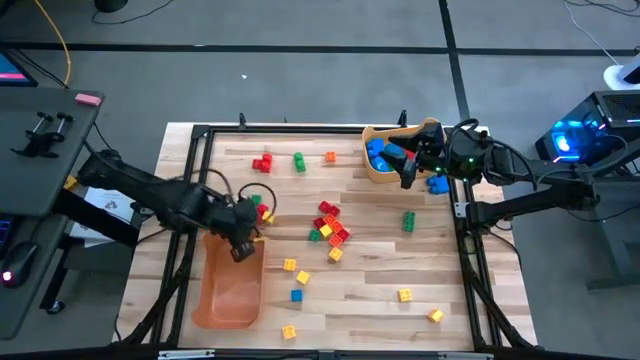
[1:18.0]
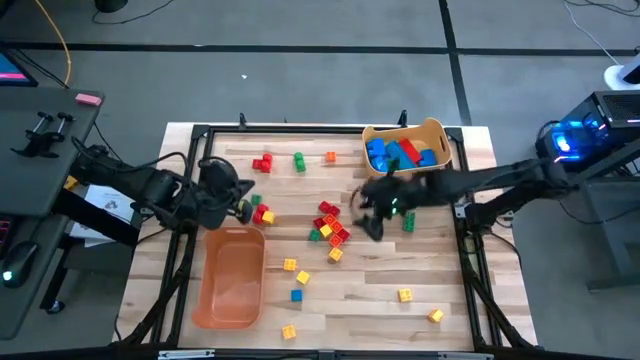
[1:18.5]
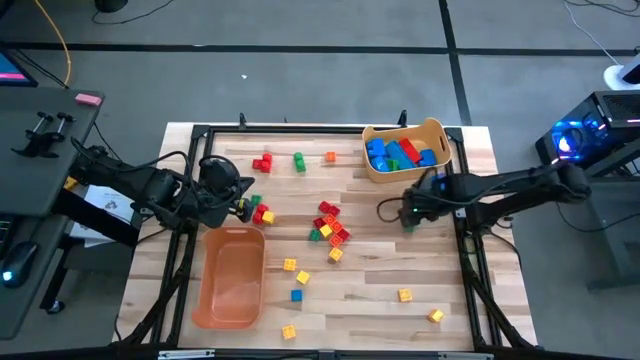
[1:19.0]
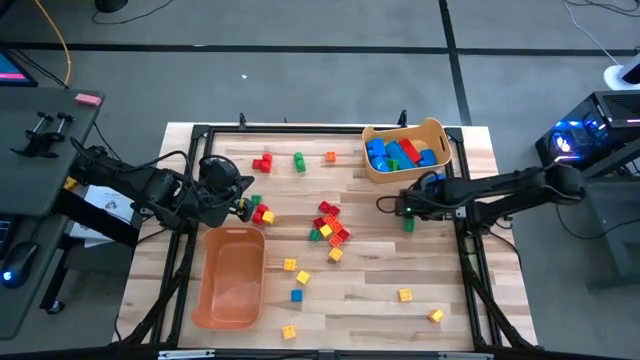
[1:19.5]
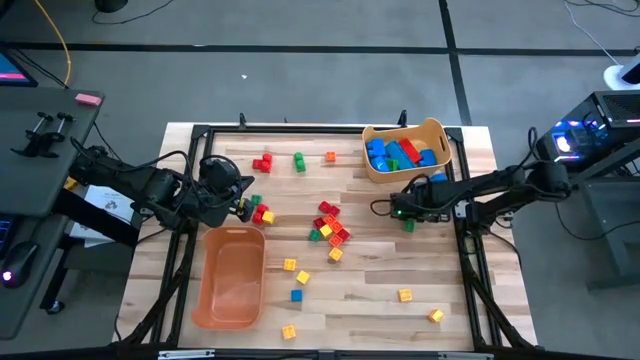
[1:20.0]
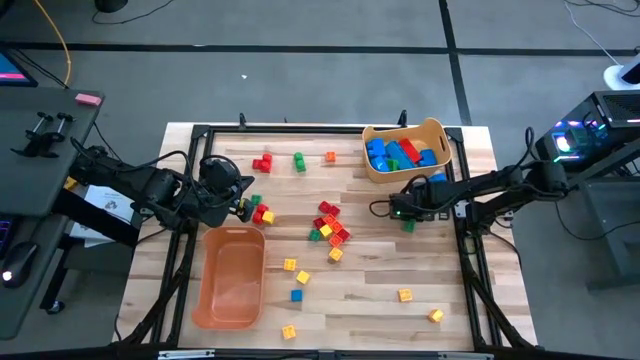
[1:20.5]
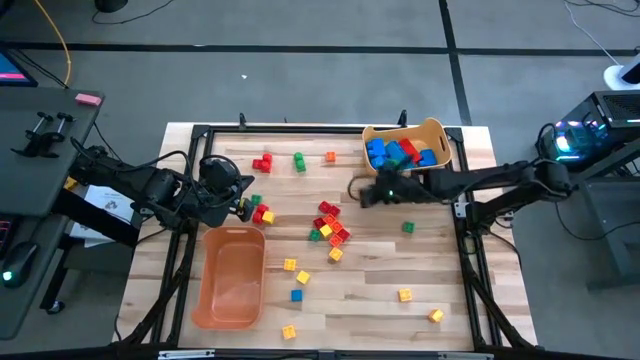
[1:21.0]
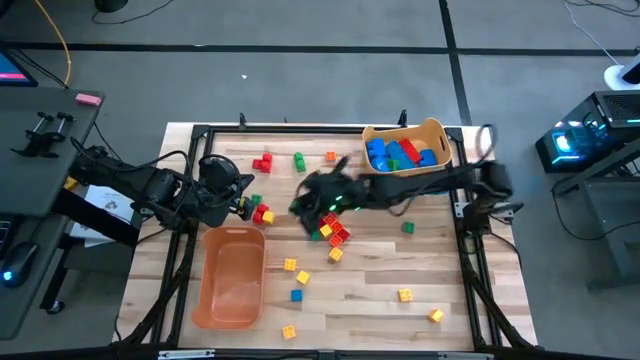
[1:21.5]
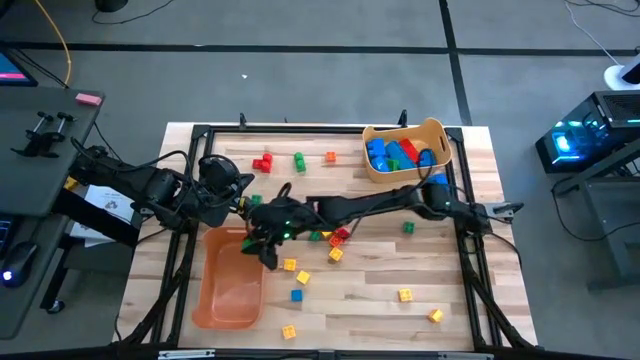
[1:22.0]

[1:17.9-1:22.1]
Task: Sort blocks by size
Put the green game piece into the orange bin

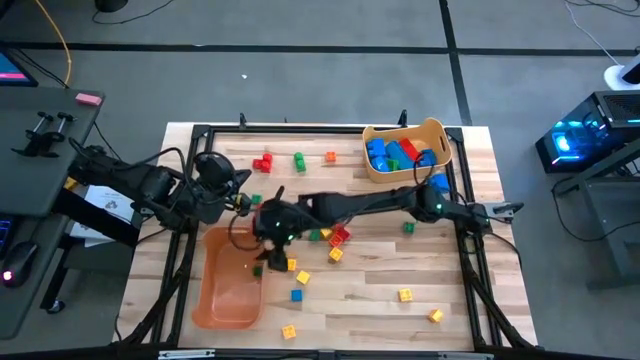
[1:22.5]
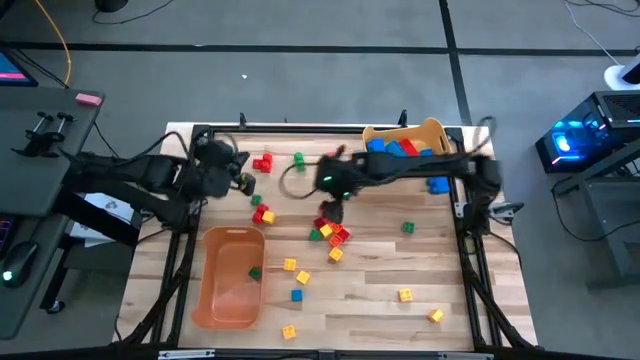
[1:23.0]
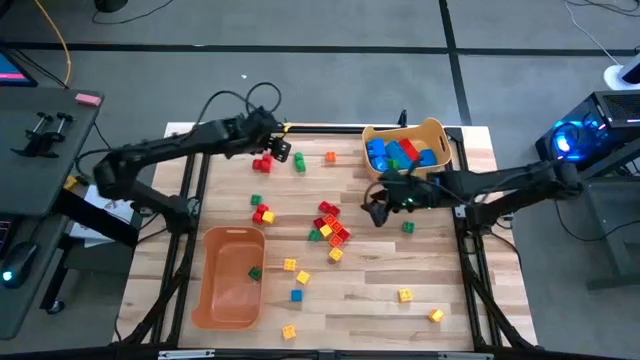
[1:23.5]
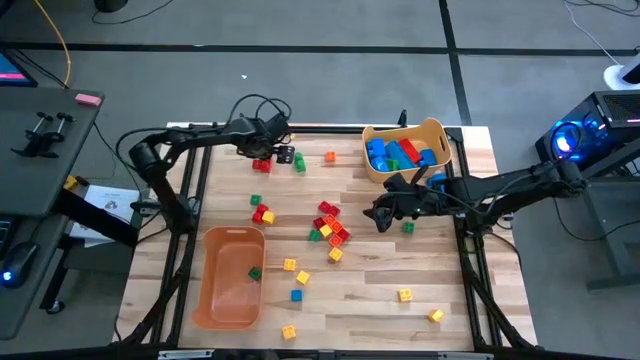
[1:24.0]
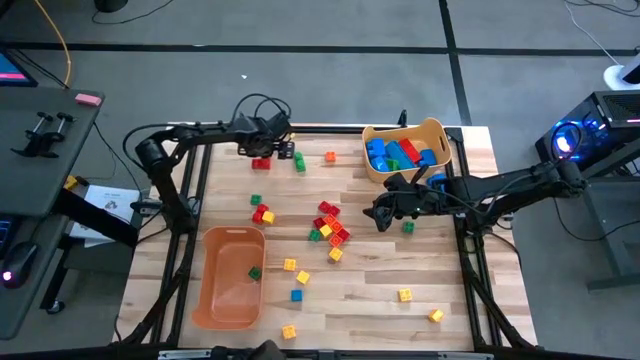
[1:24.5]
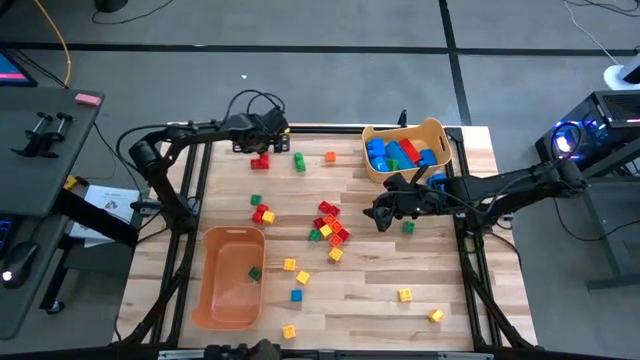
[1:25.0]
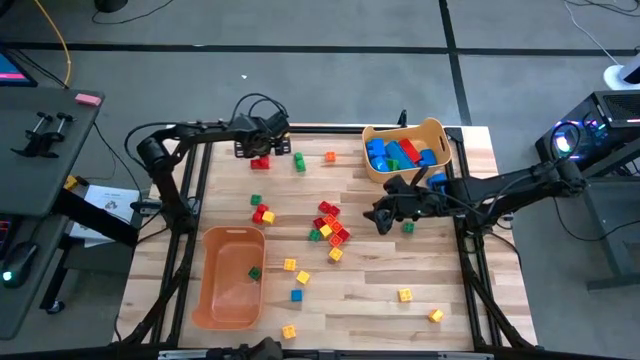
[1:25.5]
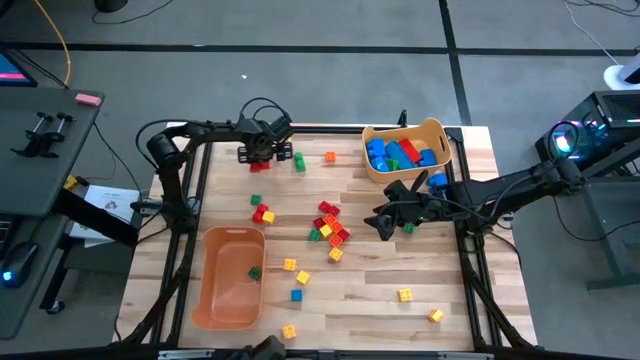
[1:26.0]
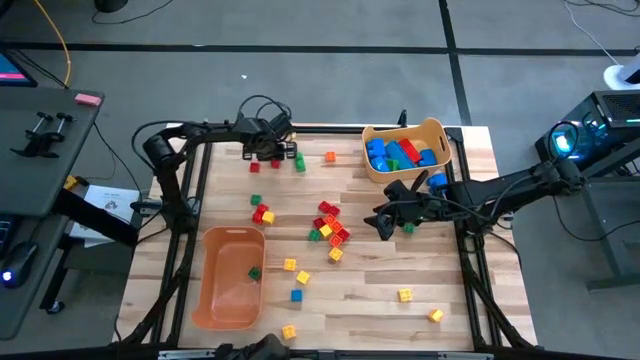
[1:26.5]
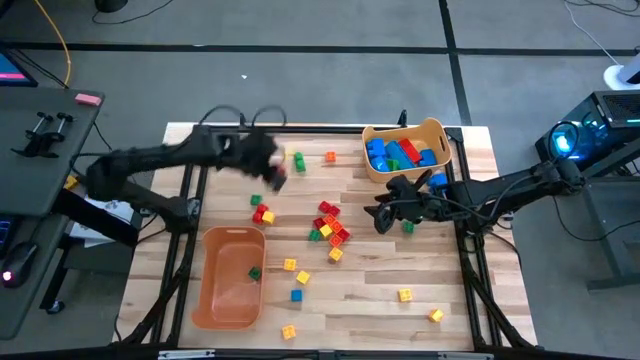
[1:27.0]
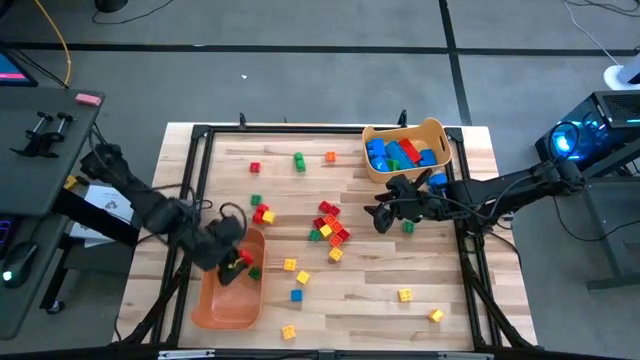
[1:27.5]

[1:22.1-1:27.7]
Put the red game piece into the orange bin

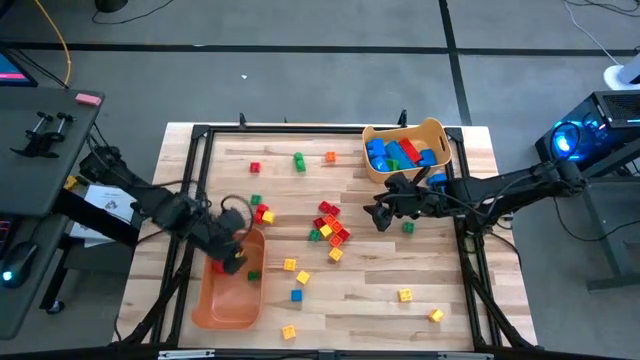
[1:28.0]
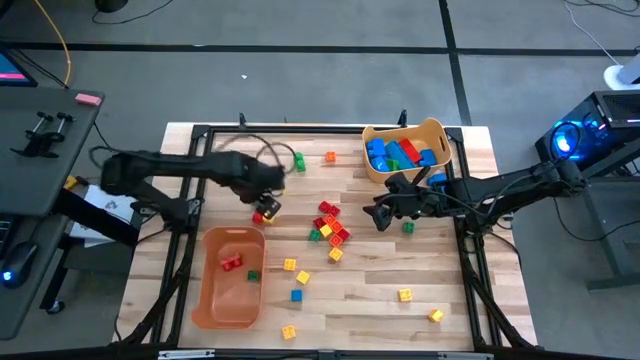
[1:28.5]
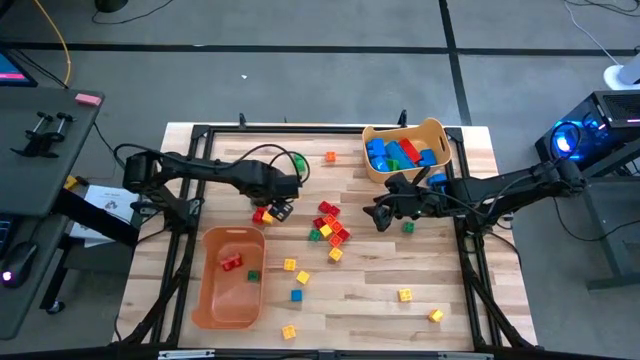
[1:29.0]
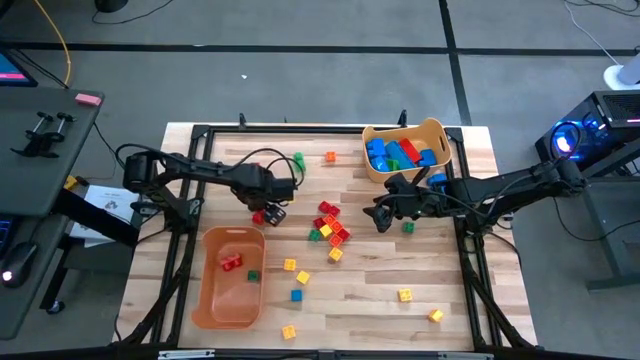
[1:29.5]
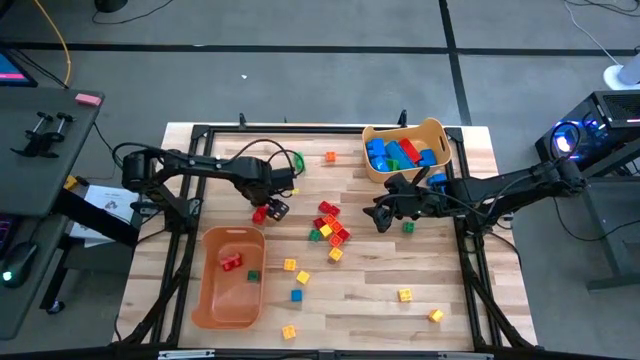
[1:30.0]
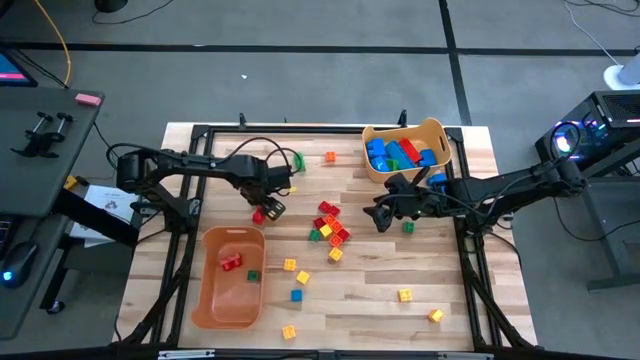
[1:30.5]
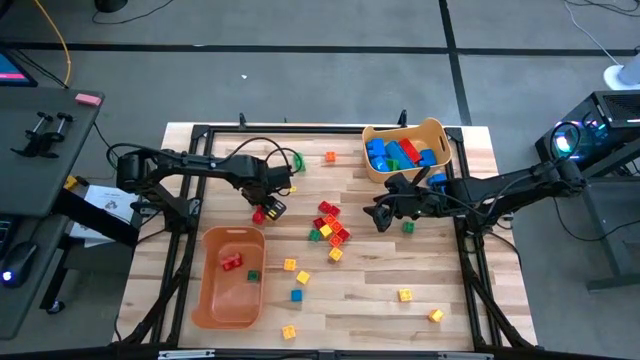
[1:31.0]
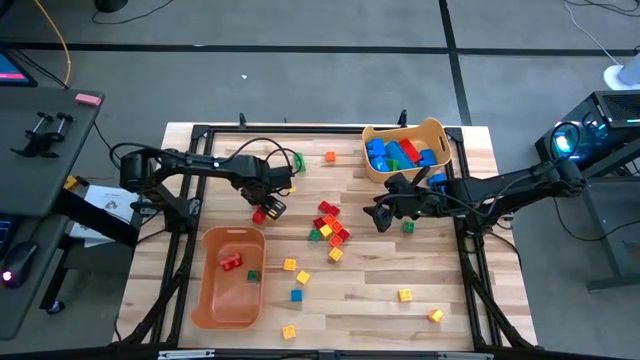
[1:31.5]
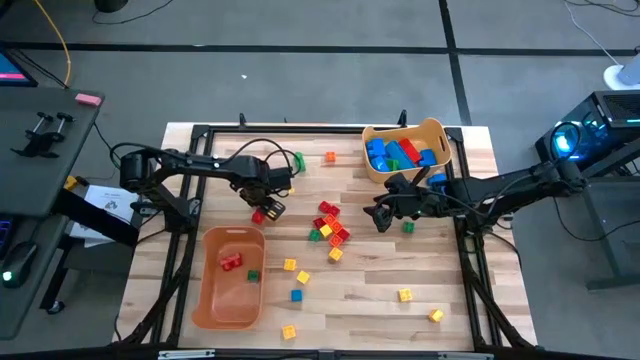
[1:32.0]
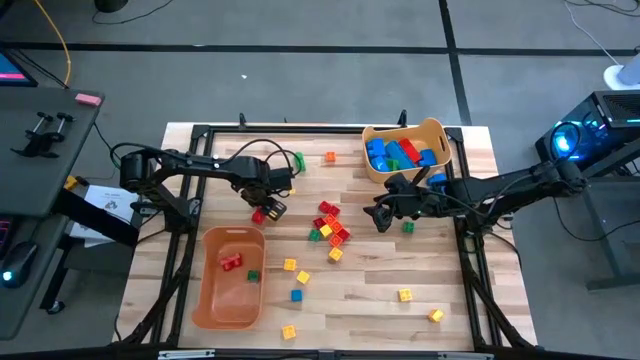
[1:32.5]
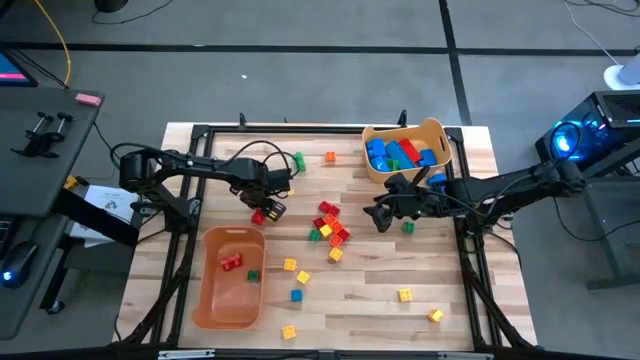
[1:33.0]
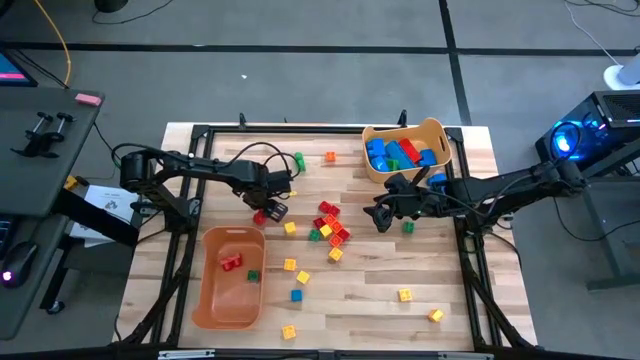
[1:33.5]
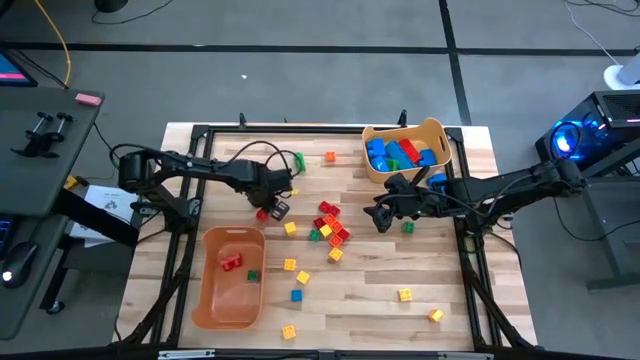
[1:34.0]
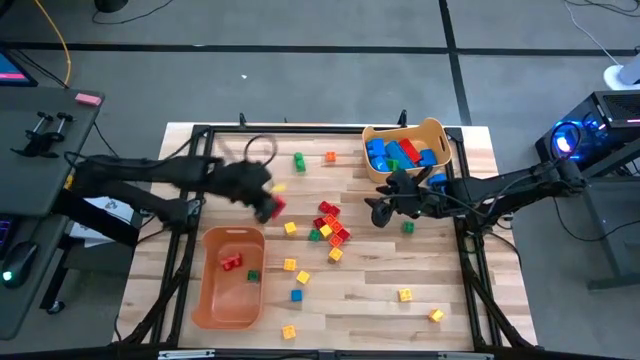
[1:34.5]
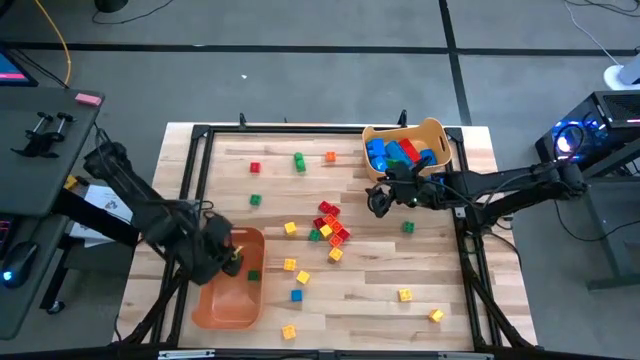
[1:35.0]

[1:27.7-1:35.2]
Put the red game piece into the orange bin

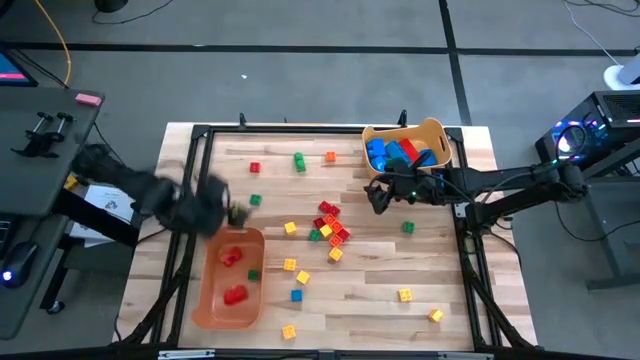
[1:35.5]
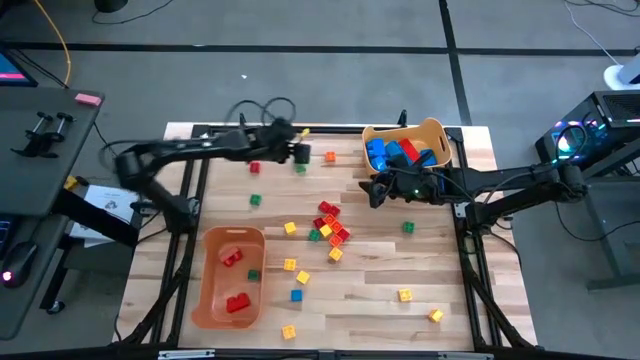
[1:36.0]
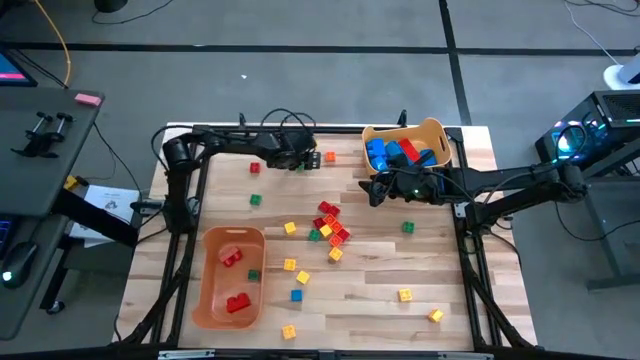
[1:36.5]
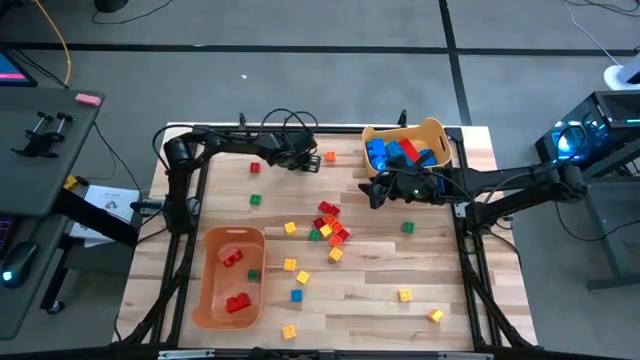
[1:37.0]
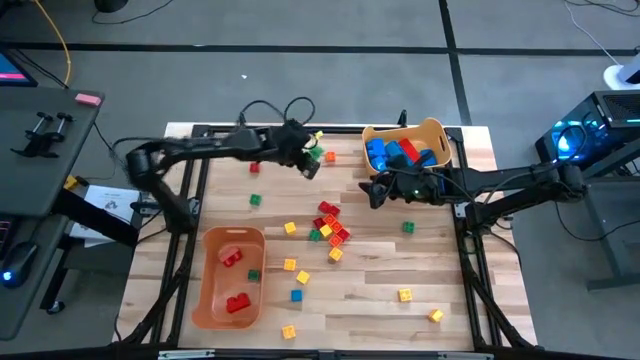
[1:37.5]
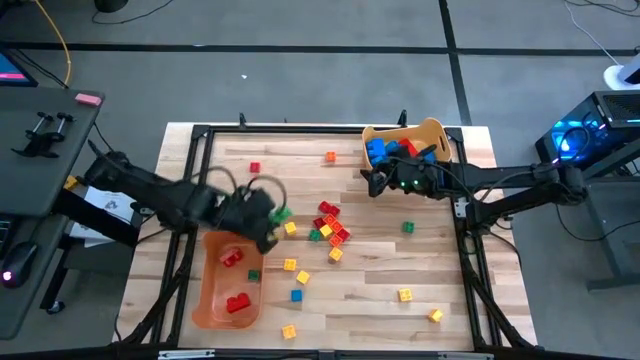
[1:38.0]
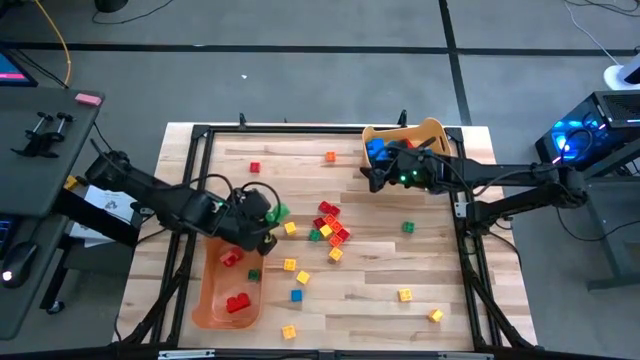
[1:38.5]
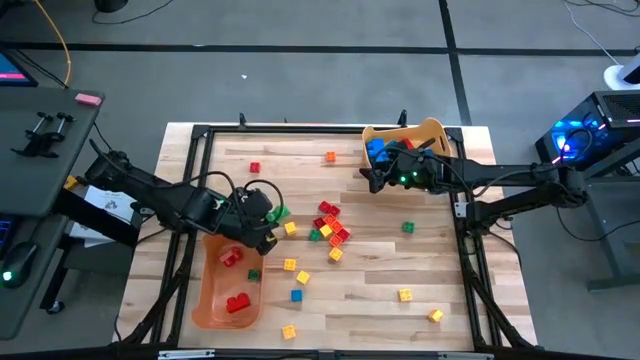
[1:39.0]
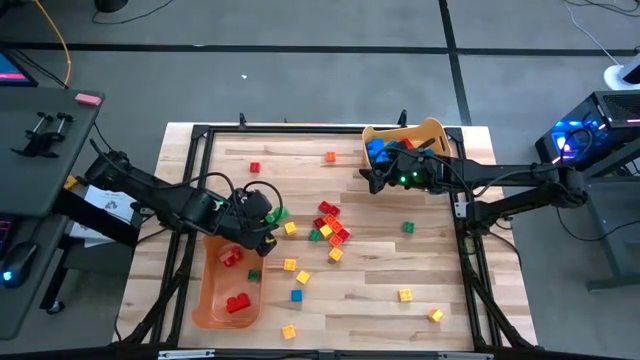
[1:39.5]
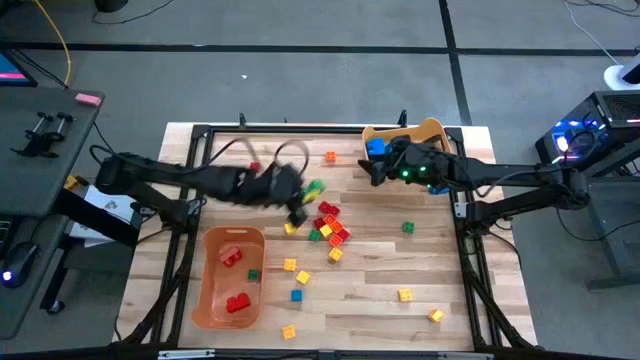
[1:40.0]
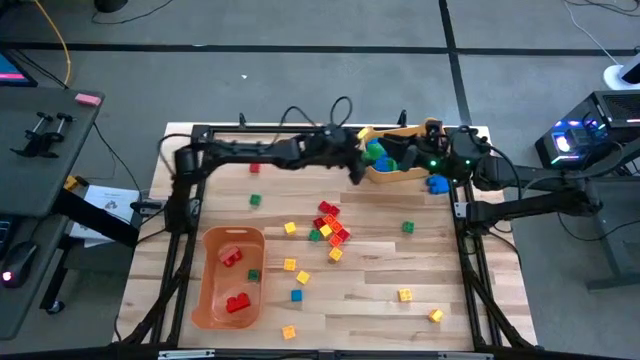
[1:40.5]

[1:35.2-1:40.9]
Put the green game piece into the yellow bin
